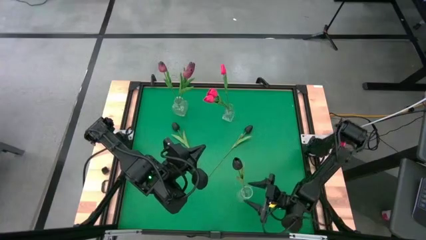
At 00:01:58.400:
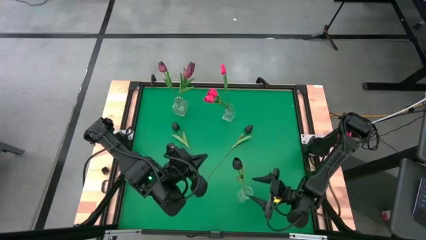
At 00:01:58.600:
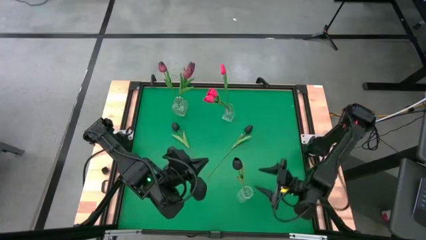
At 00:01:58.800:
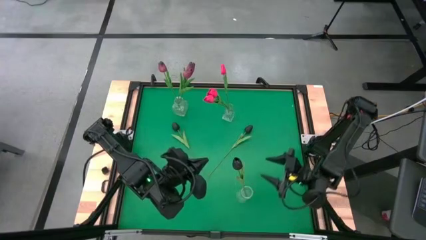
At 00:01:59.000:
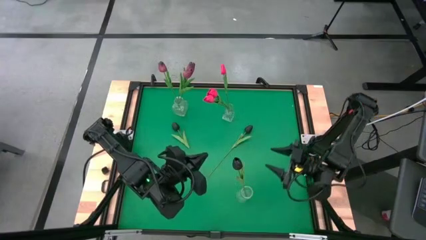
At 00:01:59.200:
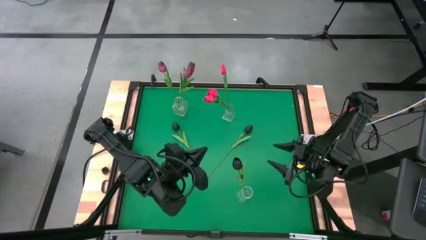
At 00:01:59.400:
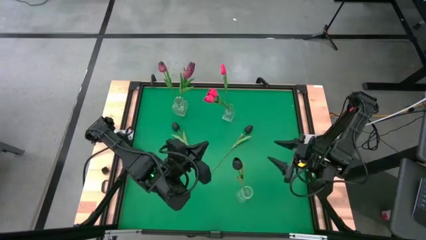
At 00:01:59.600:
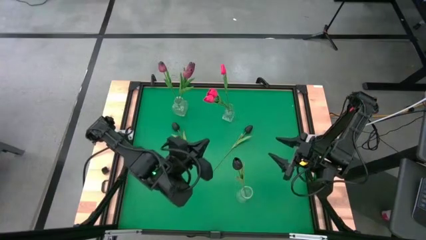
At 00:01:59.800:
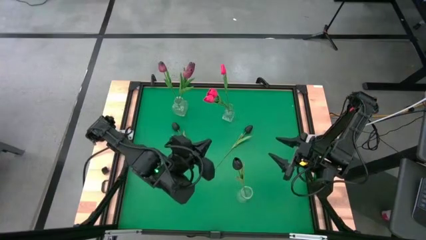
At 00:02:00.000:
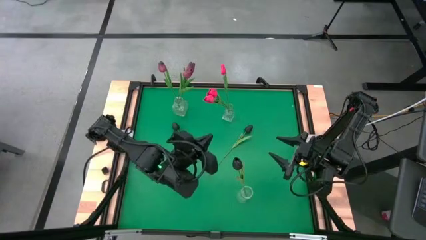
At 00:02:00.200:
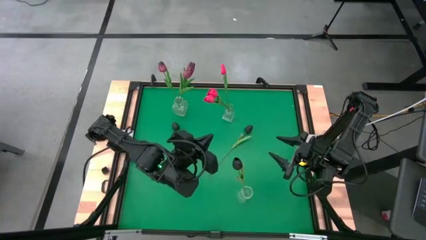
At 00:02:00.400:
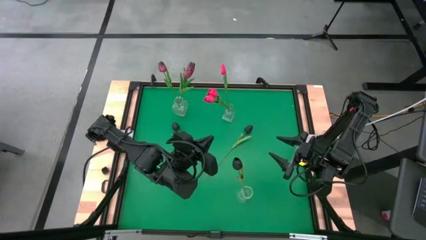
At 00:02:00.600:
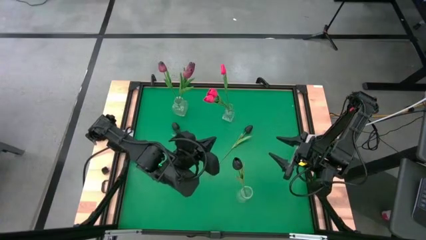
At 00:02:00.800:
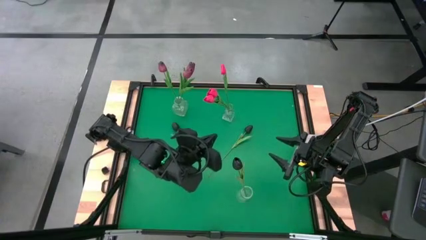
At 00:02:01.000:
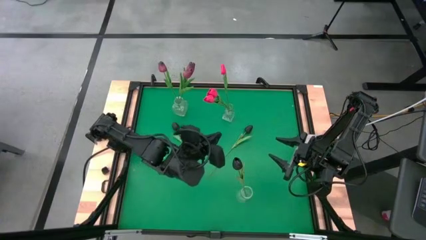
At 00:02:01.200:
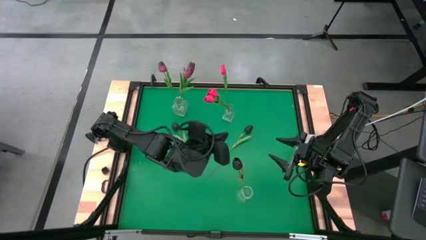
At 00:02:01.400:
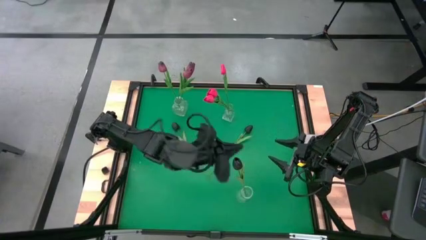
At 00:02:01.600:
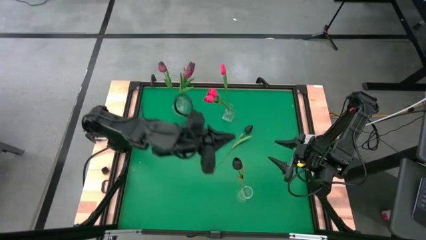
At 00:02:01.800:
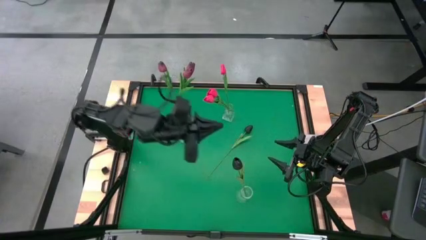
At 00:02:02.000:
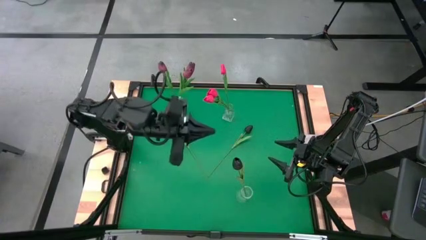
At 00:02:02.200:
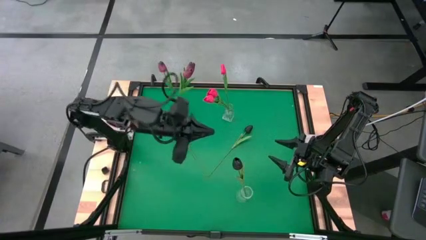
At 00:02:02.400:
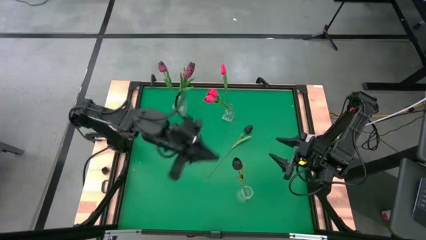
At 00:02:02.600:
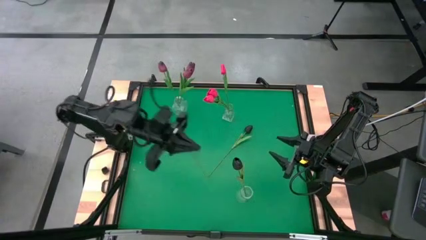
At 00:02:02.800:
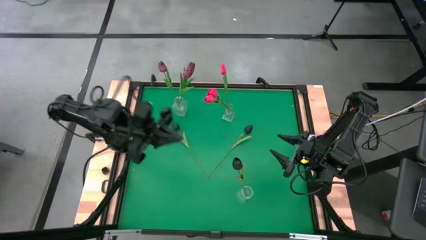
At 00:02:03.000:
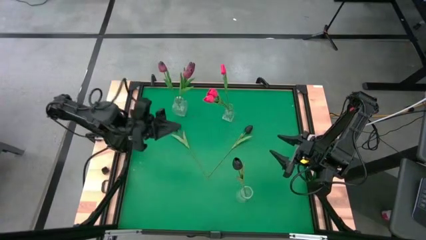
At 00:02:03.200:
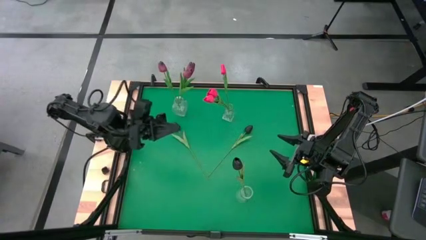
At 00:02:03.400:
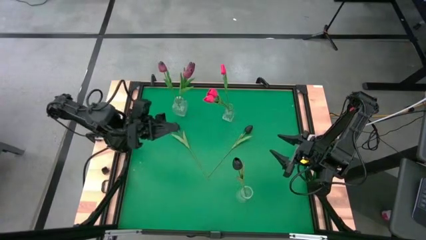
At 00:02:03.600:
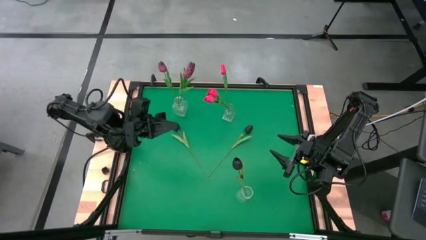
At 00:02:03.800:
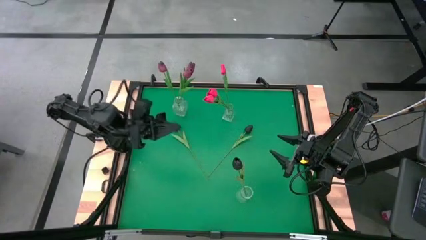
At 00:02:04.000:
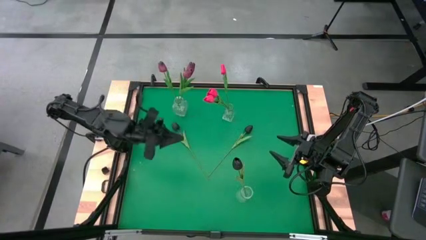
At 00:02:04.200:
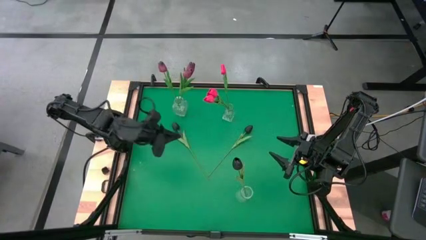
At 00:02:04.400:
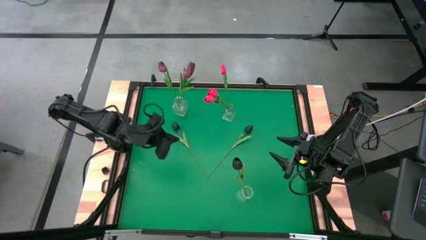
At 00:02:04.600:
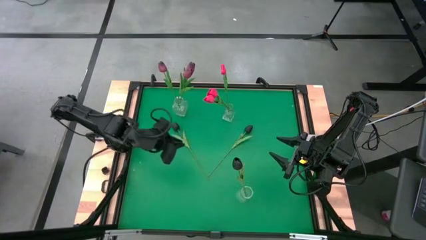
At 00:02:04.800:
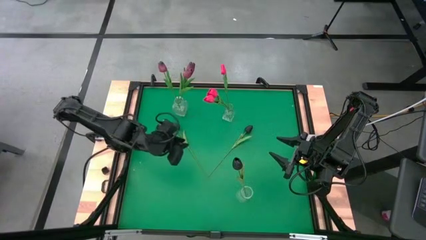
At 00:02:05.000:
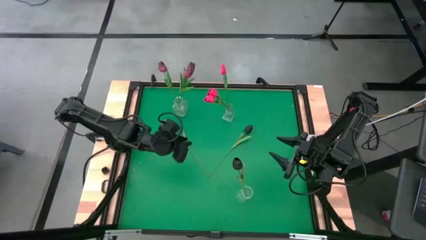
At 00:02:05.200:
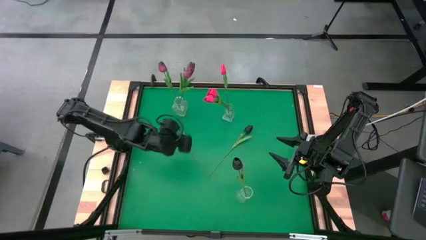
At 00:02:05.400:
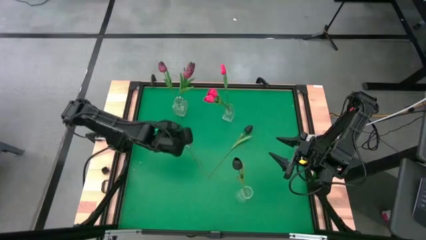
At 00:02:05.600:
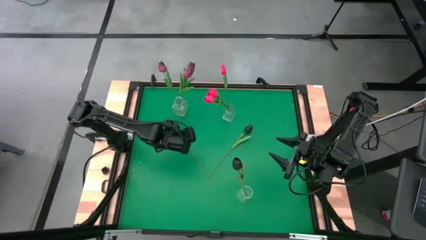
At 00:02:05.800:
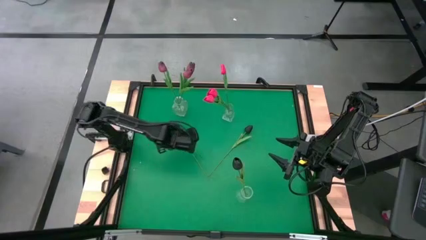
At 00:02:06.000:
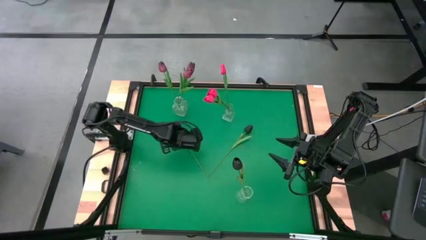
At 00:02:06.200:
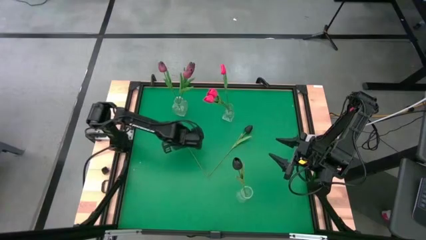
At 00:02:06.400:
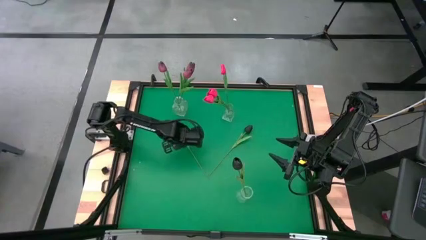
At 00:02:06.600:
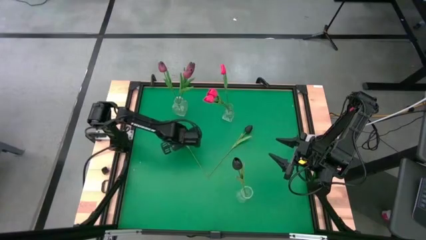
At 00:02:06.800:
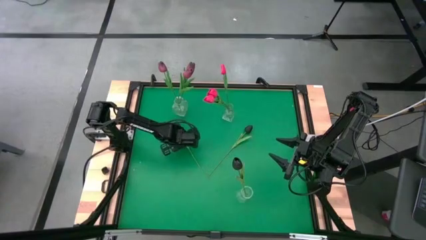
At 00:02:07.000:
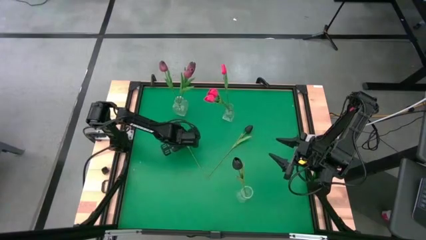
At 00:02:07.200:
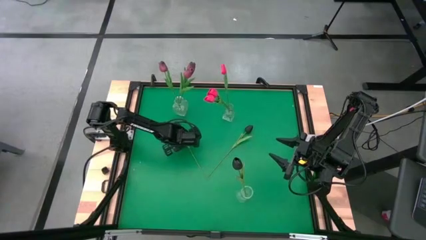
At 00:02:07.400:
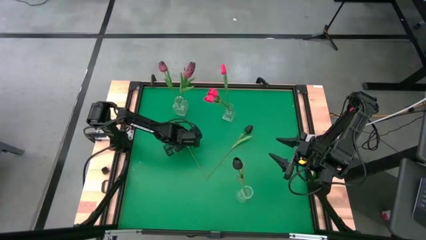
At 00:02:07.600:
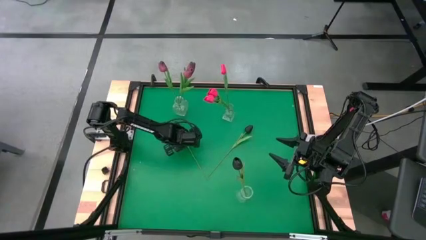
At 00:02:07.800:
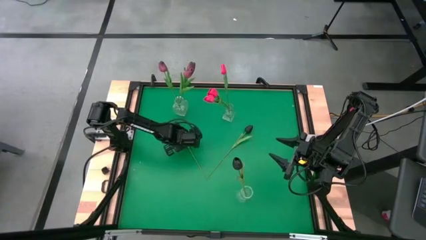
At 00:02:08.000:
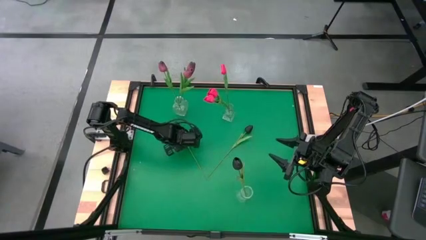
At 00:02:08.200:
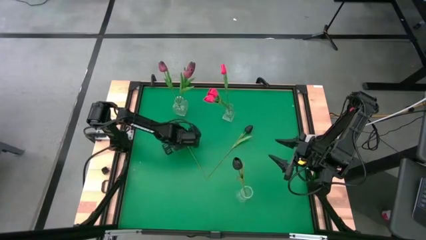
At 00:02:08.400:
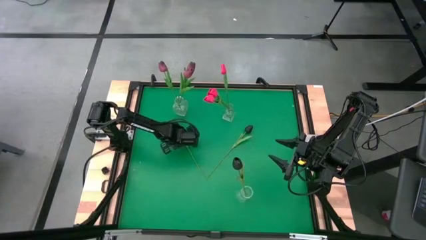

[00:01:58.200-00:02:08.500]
Task: Sort flowers into vase by color
Put the left black tulip into the bottom transparent vase

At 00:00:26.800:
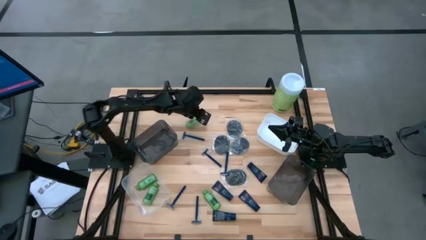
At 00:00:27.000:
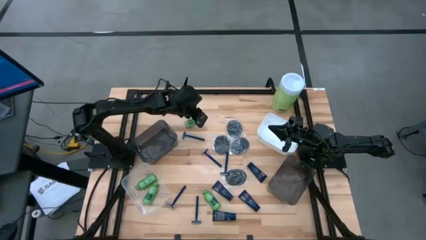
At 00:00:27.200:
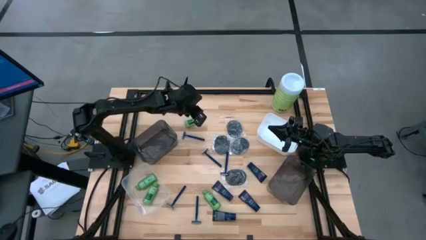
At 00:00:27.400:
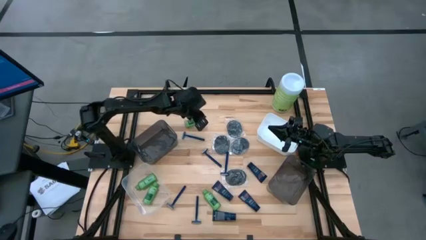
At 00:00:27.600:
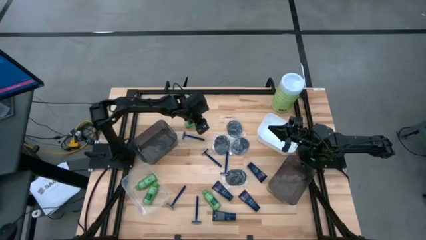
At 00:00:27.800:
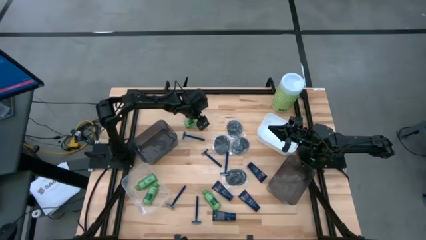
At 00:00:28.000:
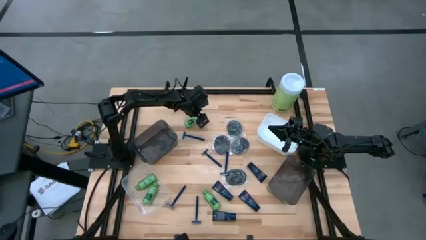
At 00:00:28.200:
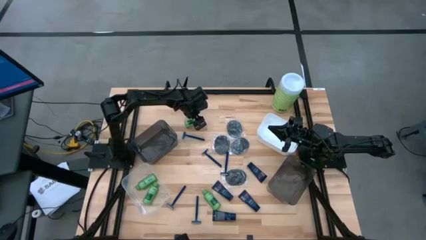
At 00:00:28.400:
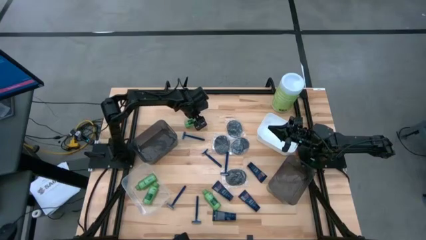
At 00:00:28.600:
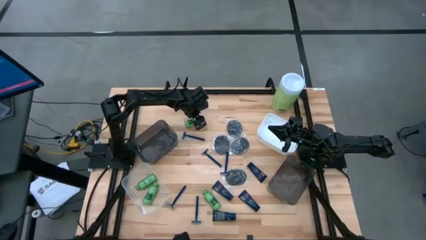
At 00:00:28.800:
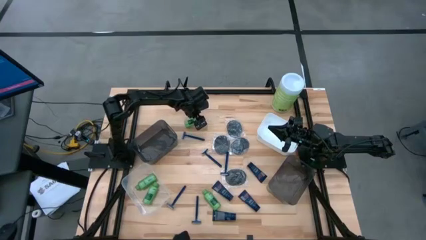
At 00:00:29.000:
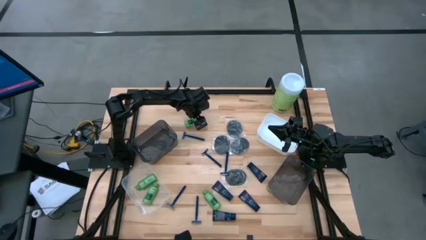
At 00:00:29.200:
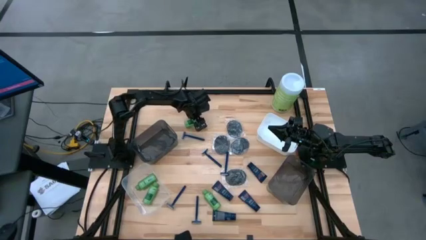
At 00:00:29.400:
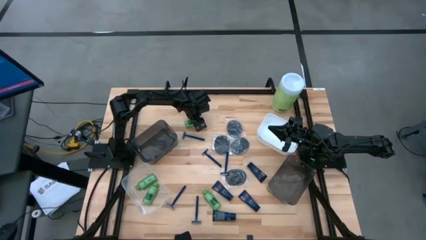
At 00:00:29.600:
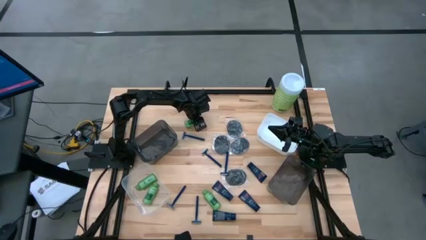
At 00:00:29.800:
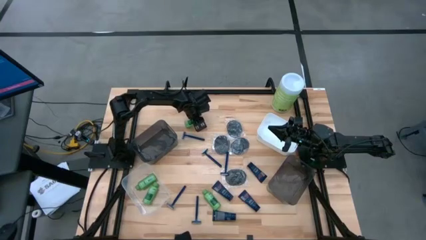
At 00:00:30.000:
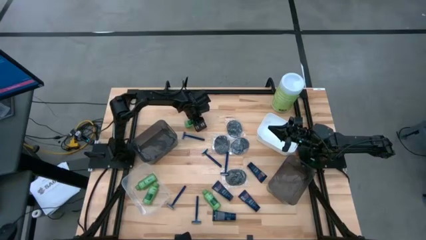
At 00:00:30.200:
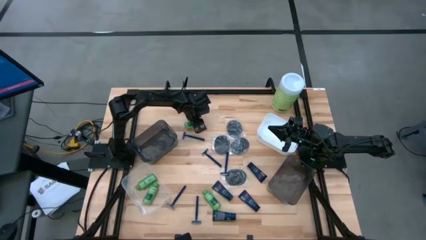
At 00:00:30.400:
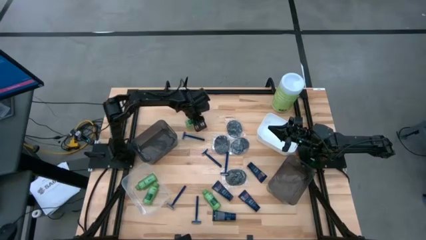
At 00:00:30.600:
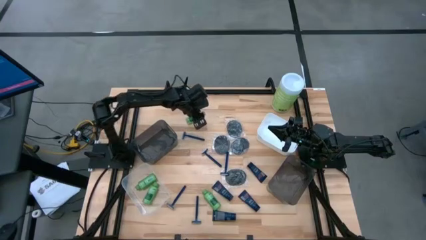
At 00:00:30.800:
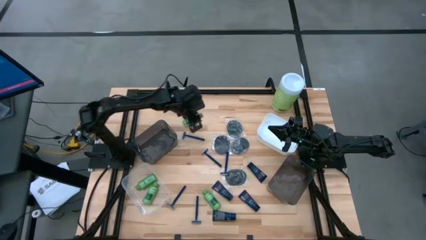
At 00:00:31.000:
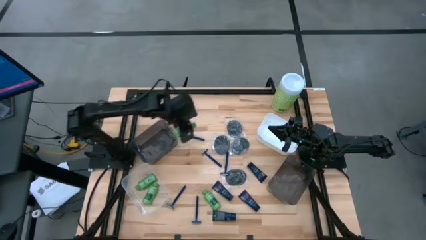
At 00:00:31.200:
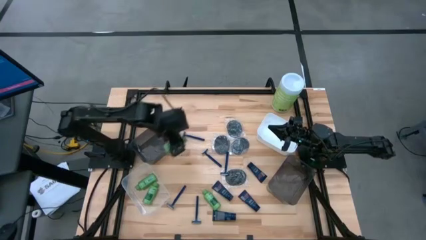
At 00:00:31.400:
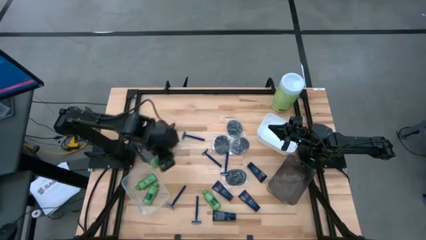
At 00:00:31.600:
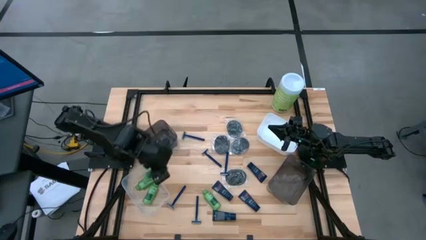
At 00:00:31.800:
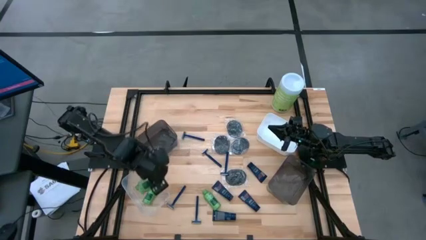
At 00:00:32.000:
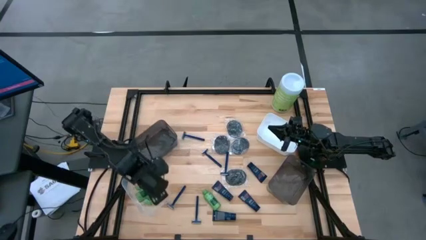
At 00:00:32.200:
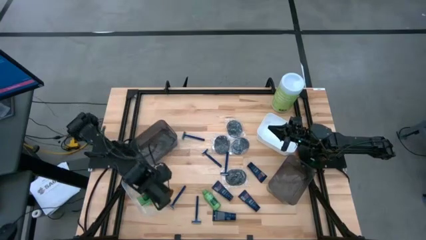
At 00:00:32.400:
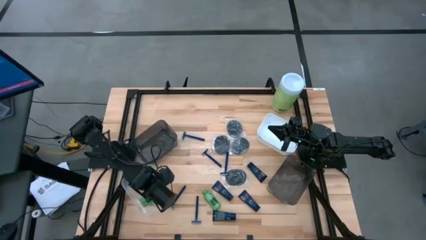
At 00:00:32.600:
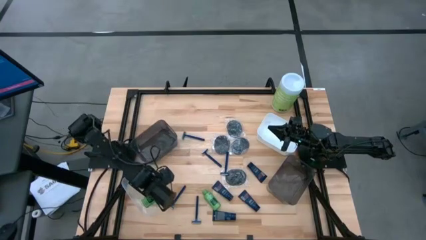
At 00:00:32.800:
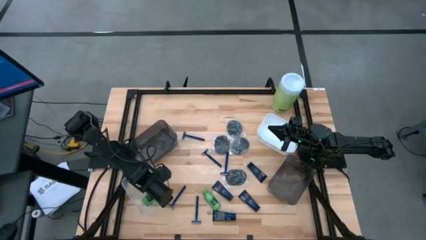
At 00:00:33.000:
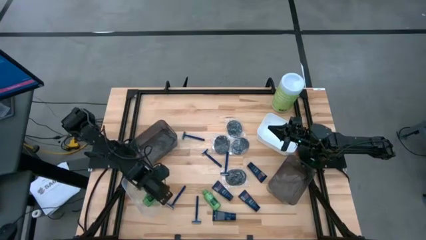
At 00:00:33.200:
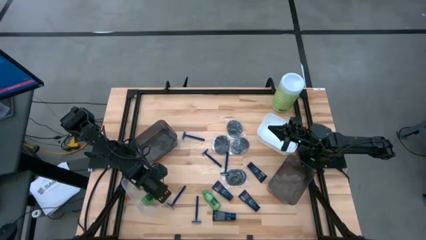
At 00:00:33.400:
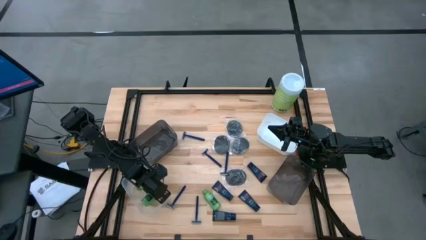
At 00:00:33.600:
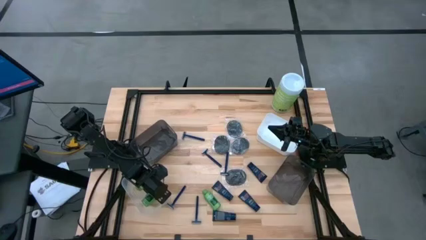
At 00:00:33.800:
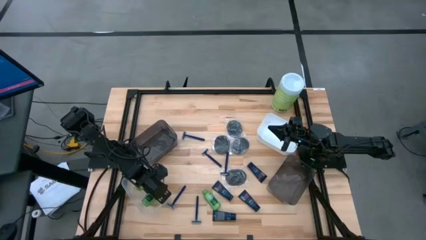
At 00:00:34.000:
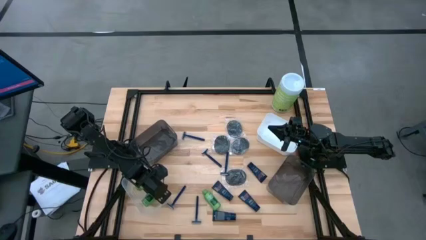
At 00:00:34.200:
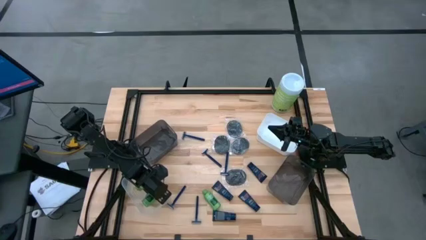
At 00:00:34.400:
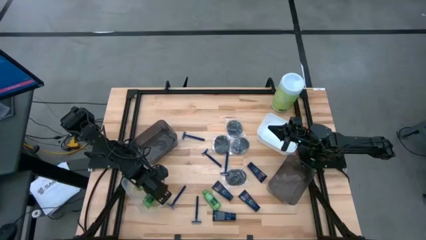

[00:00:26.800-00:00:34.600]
Task: Pick & Place Travel size toiletries
Put the green shampoo into the transparent bin
